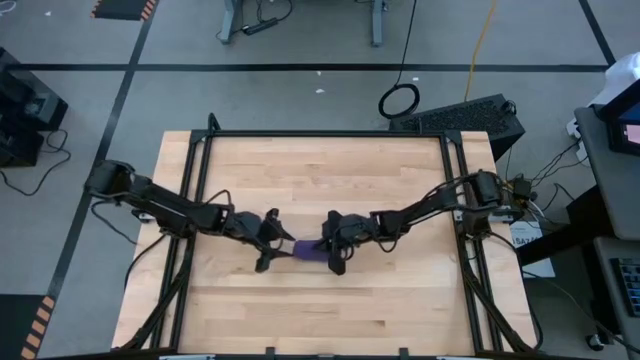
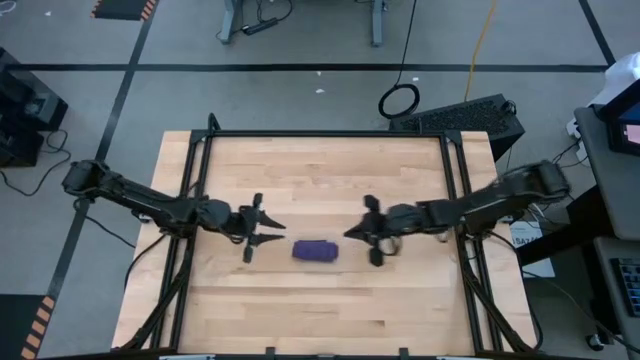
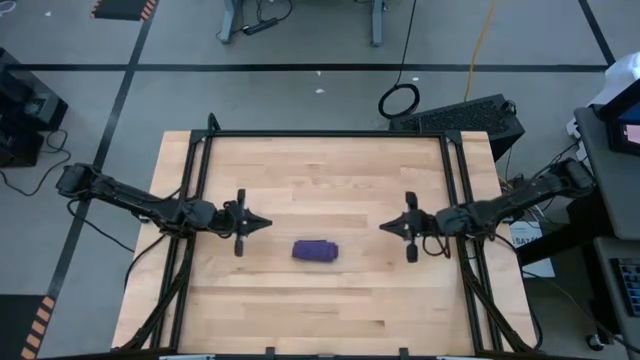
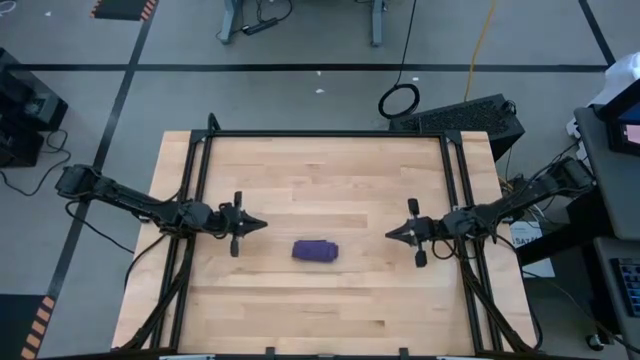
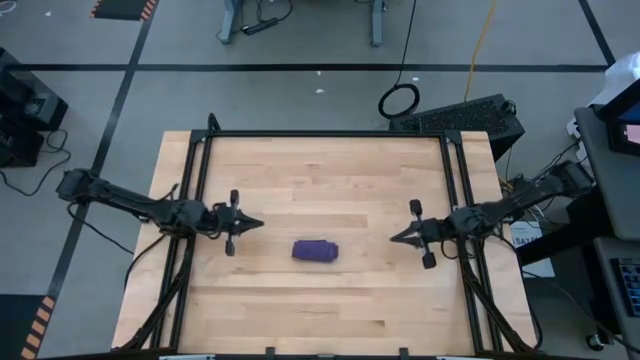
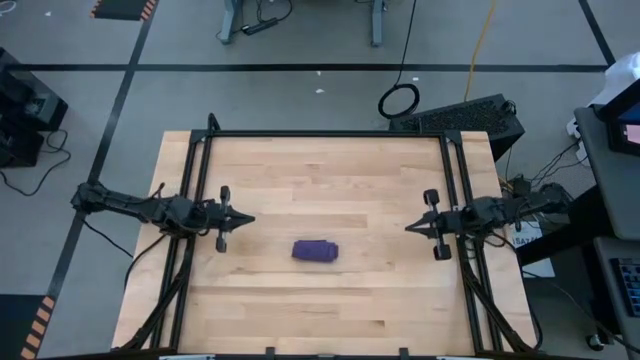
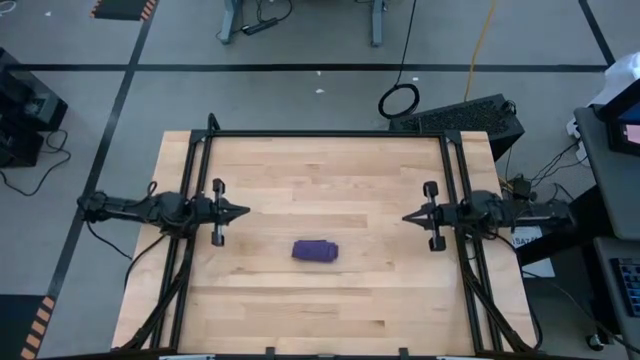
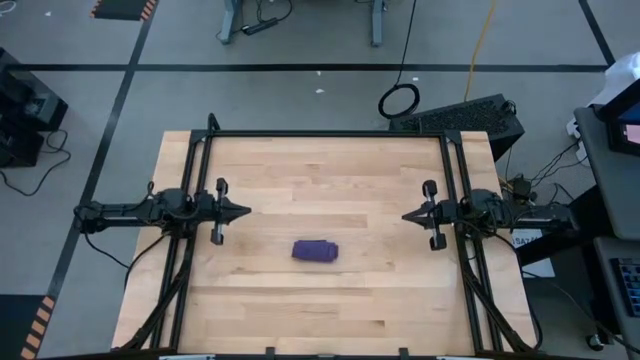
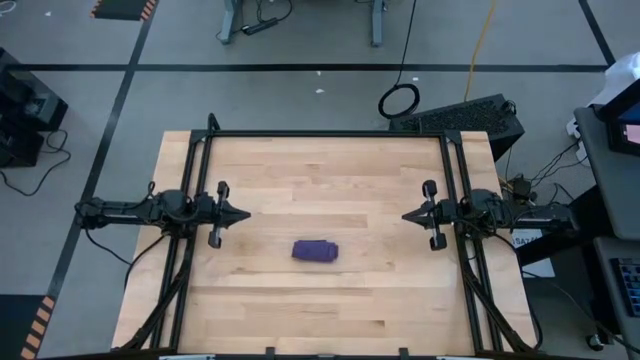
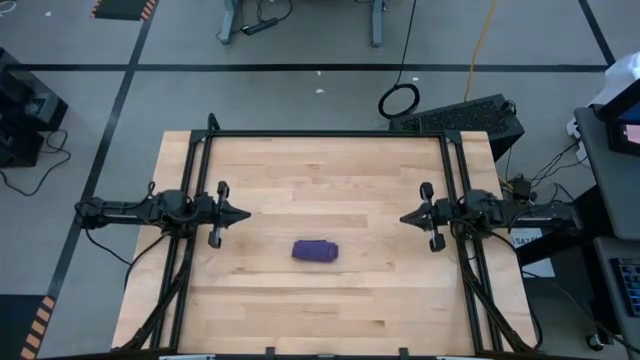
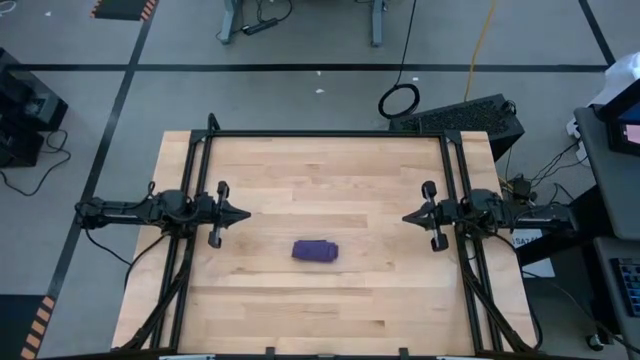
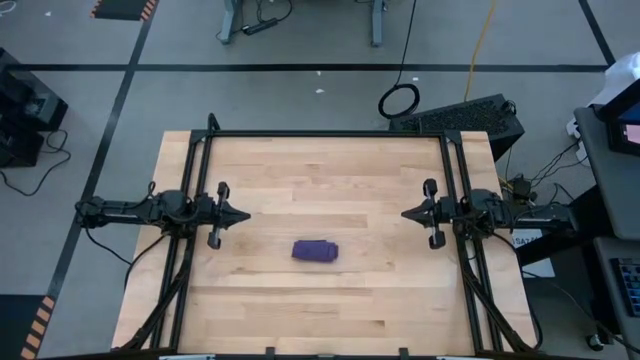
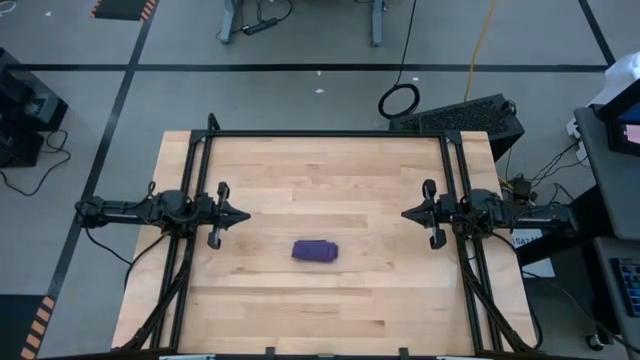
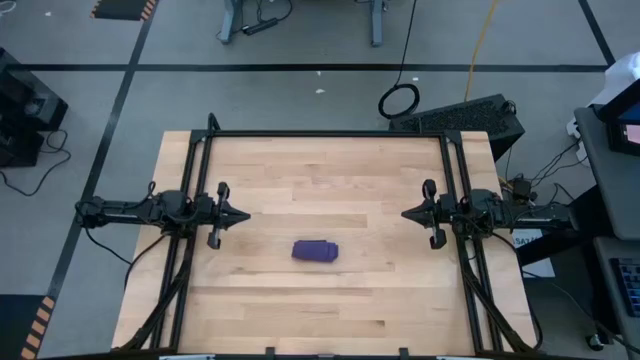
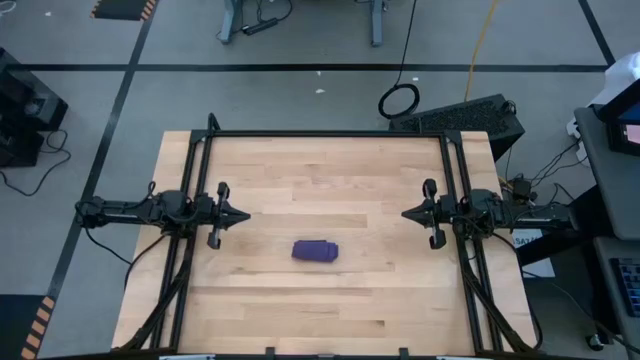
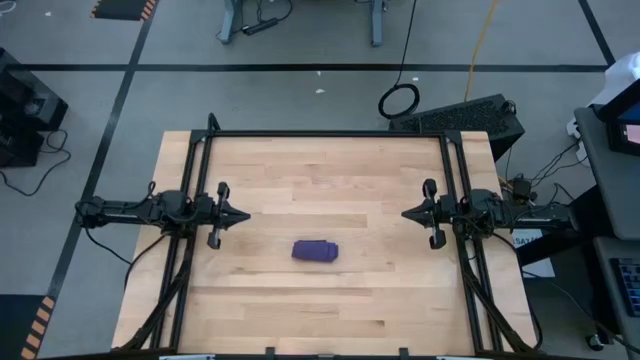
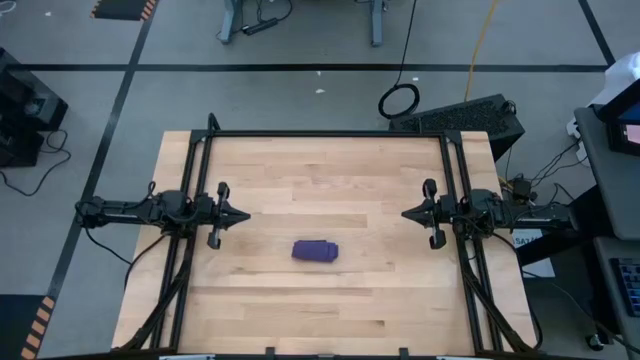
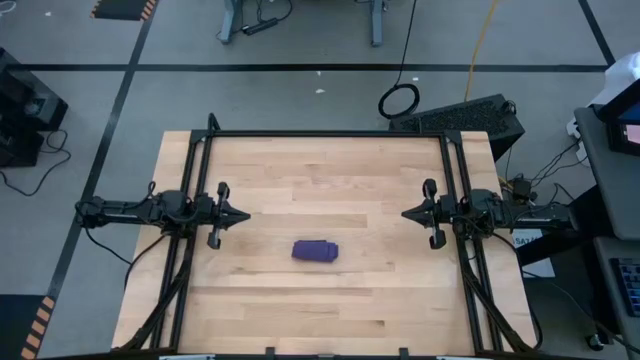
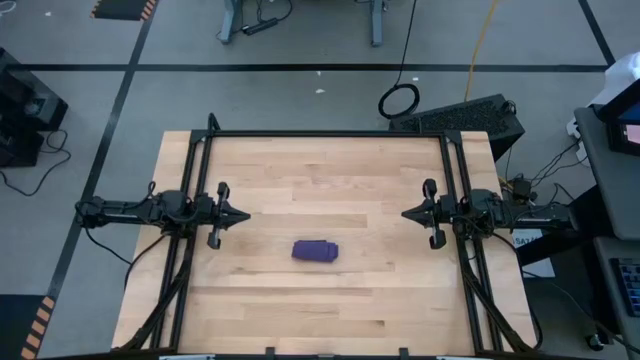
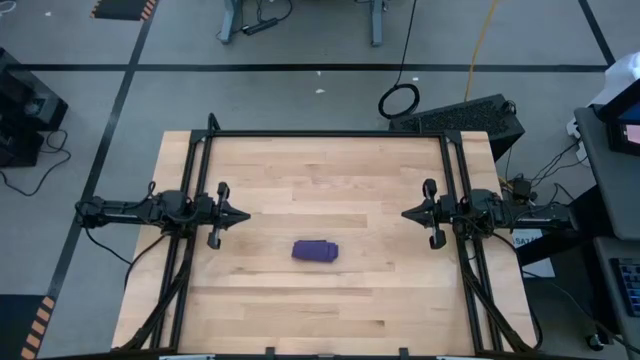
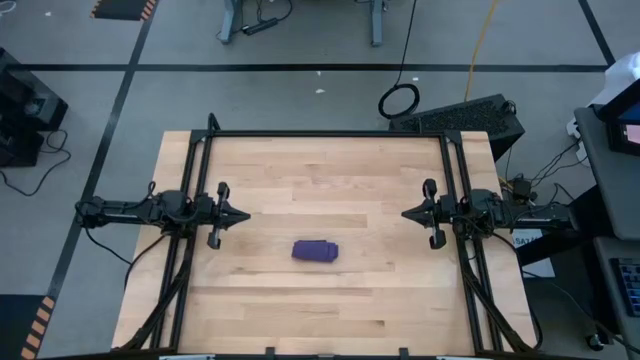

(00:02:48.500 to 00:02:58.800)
Task: Roll towel into tight, uniform cylinder
Return to Home Position

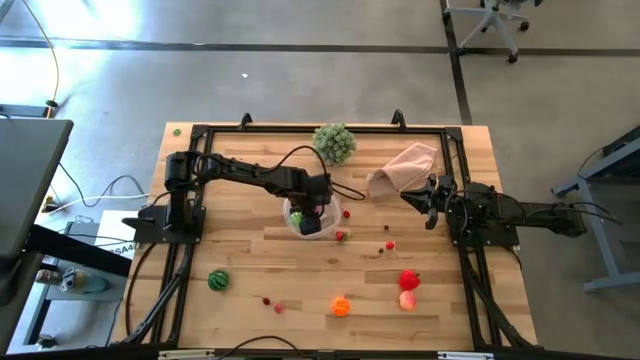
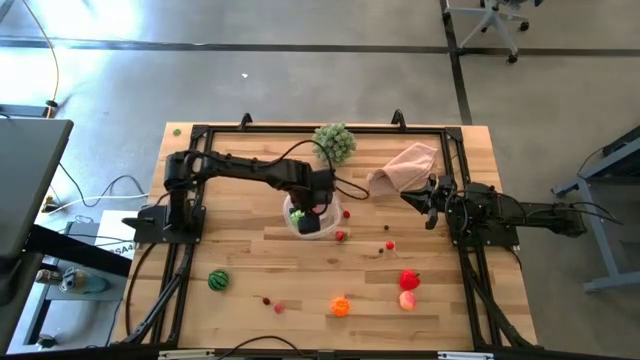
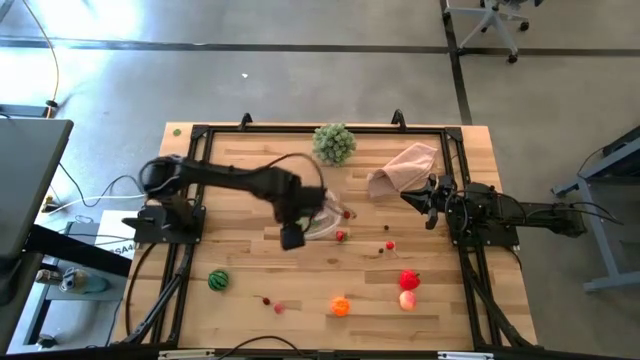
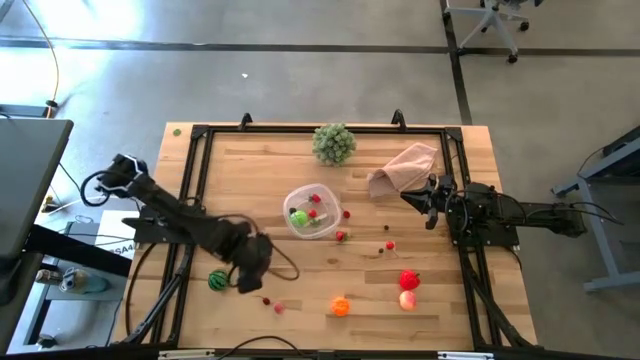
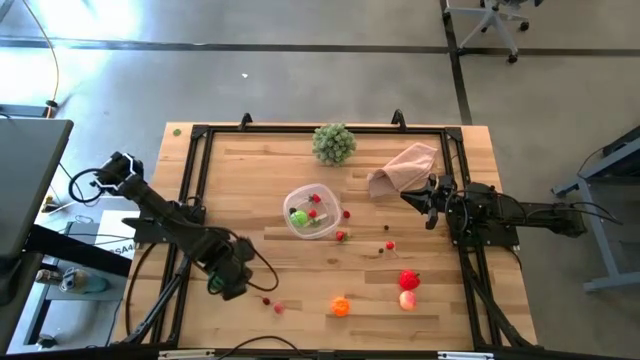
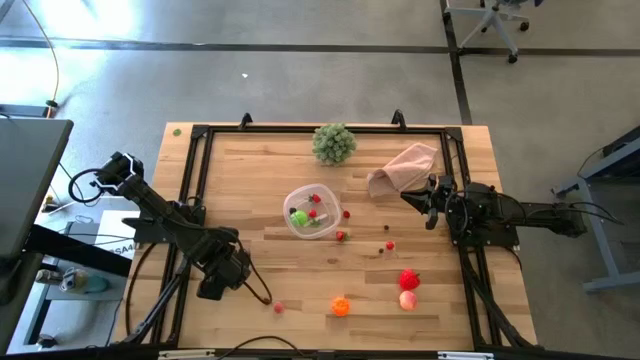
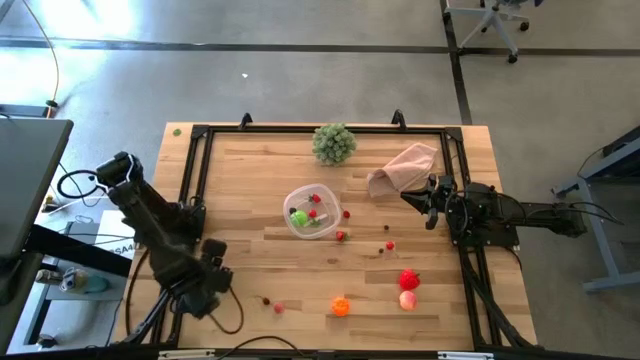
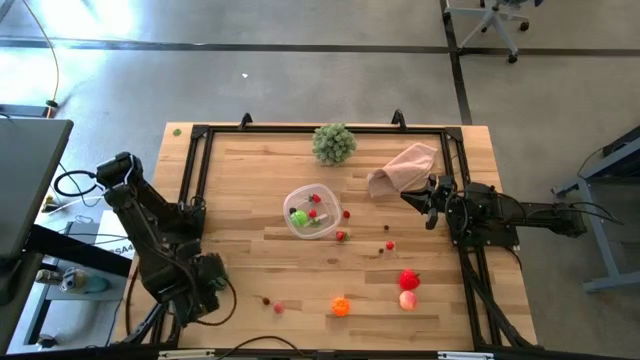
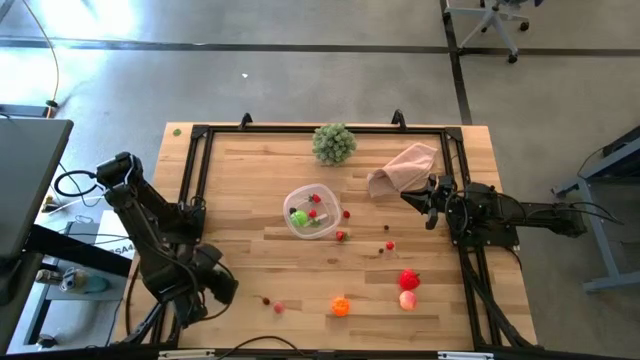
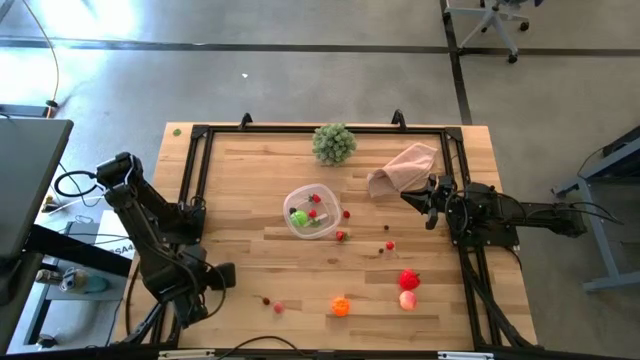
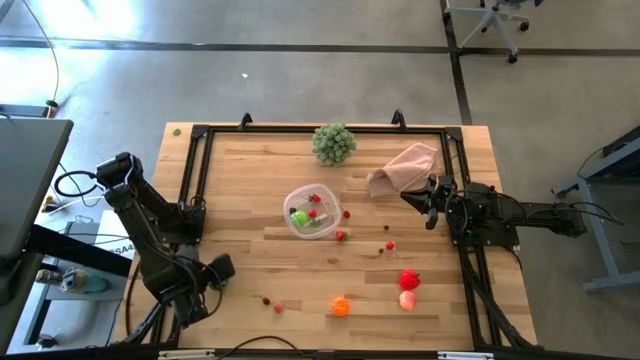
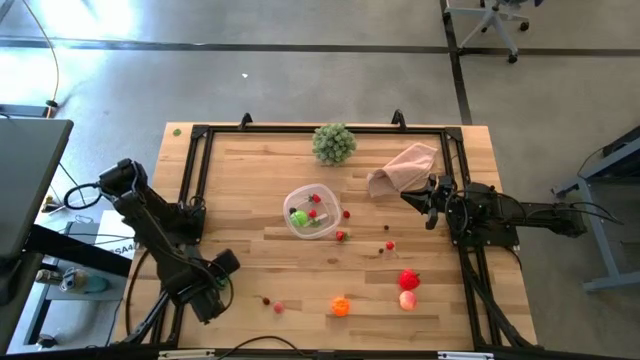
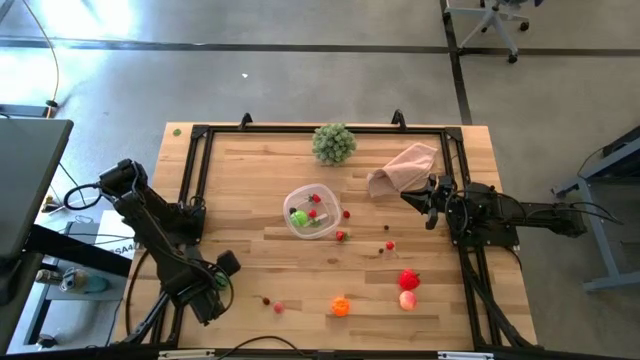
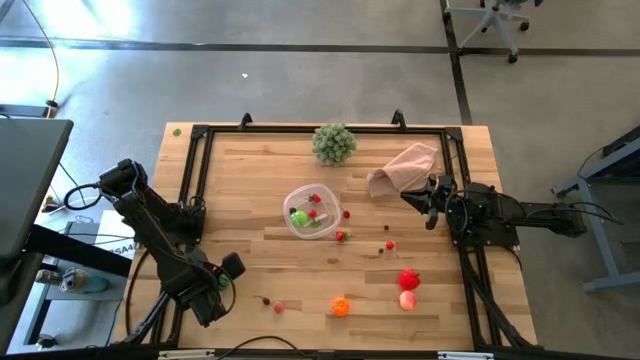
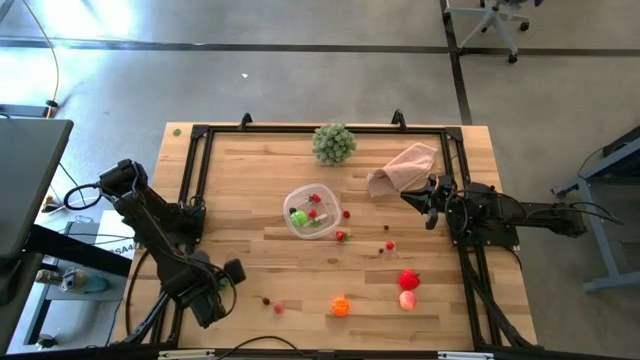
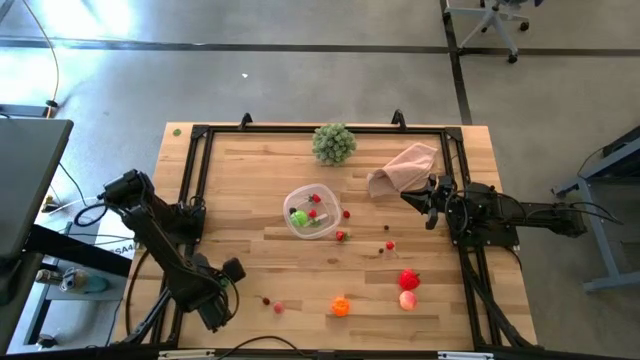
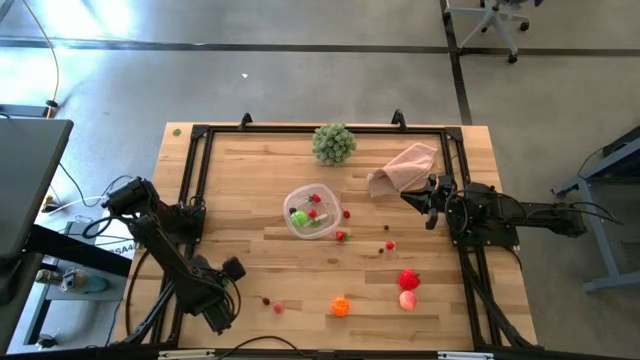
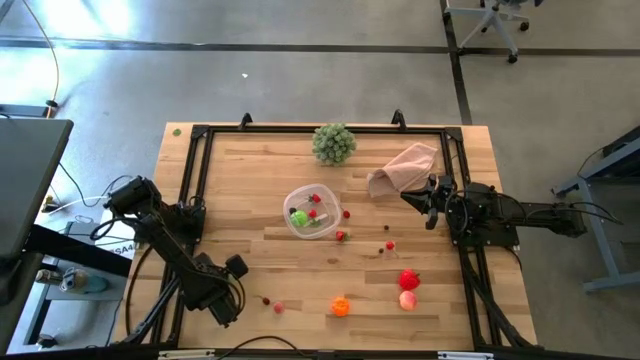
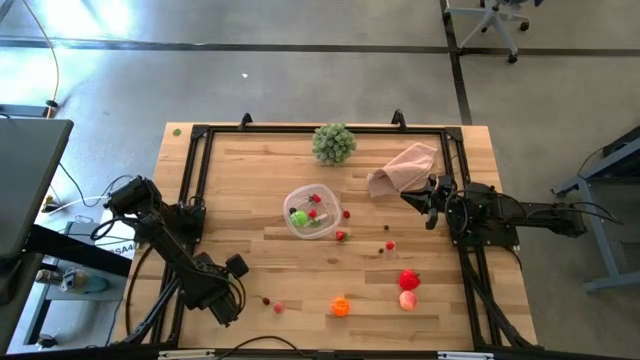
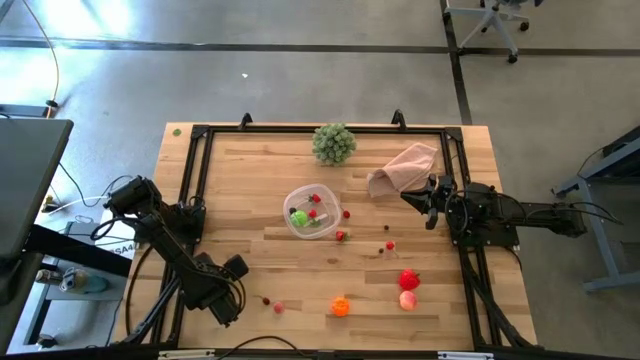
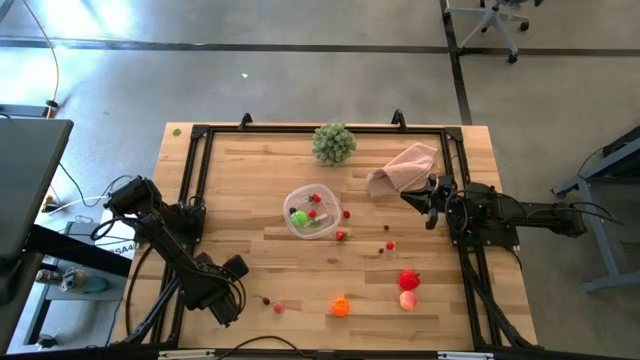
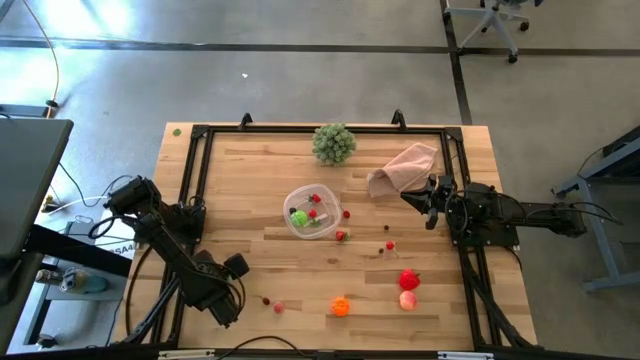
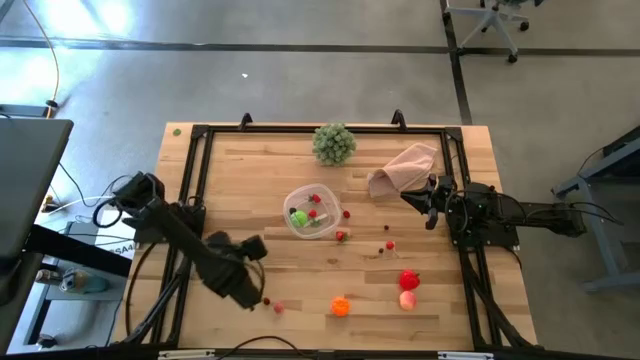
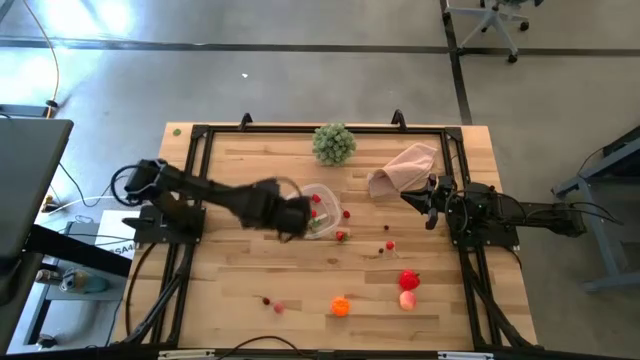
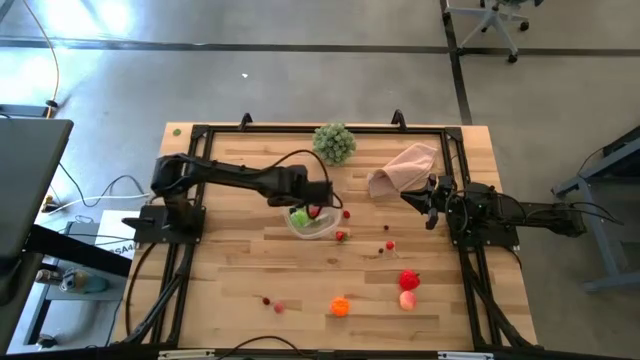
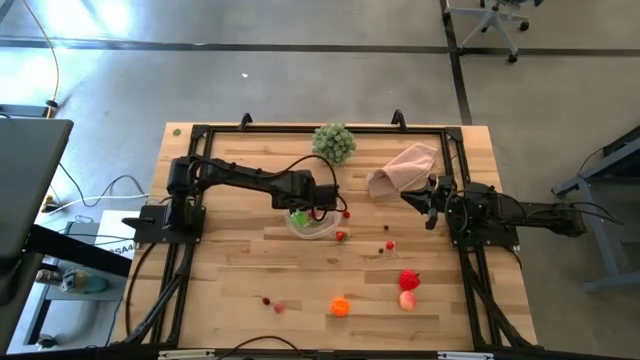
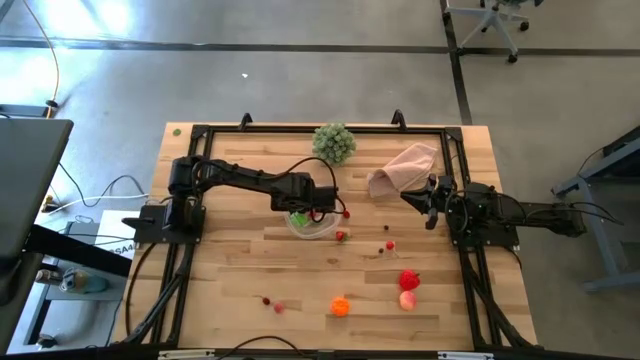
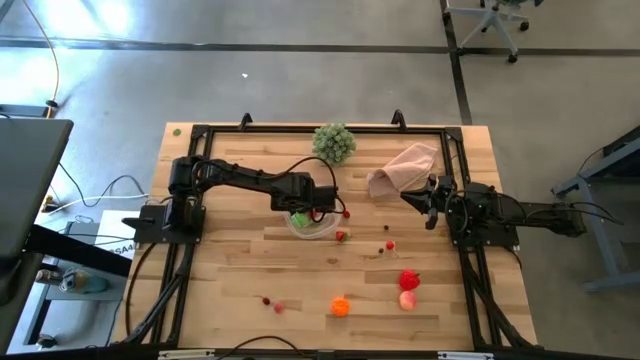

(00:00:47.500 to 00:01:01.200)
Task: Pick and placing Produce into tupperware
Put the green watermelon into the transparent bin
